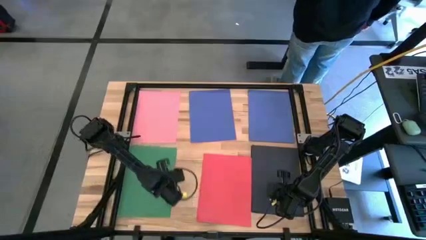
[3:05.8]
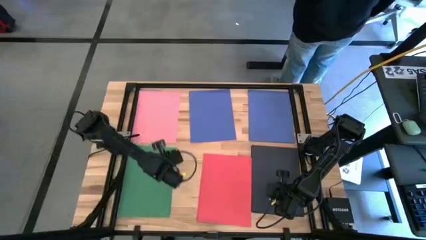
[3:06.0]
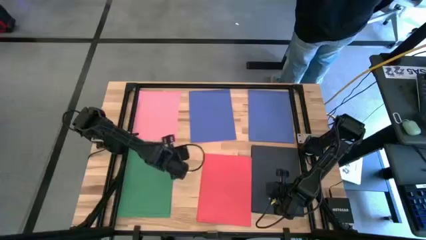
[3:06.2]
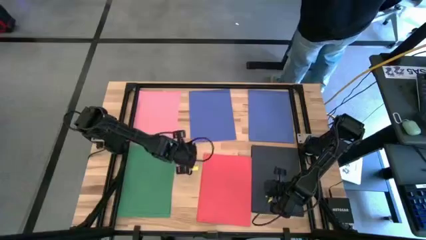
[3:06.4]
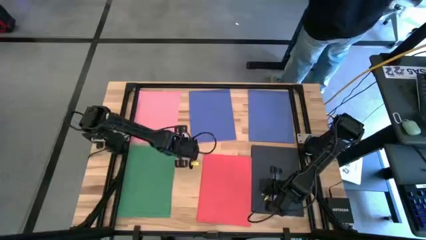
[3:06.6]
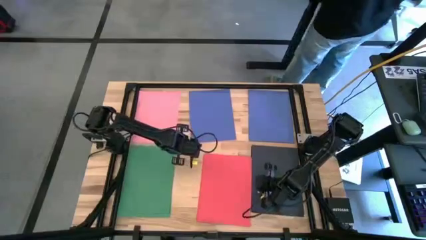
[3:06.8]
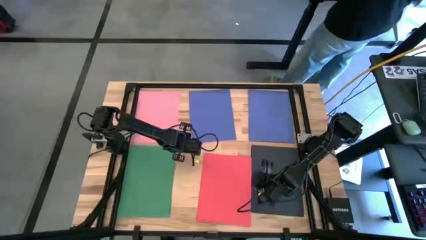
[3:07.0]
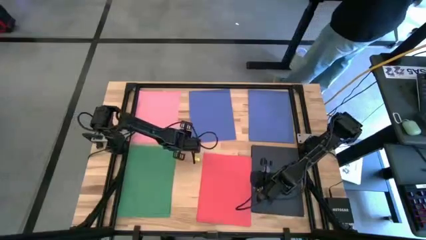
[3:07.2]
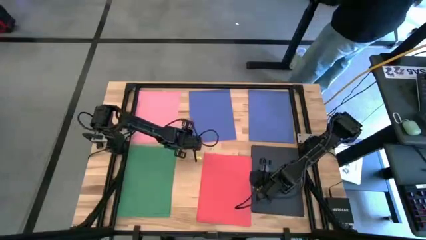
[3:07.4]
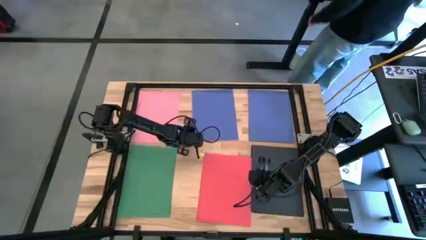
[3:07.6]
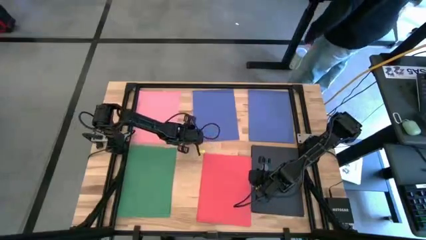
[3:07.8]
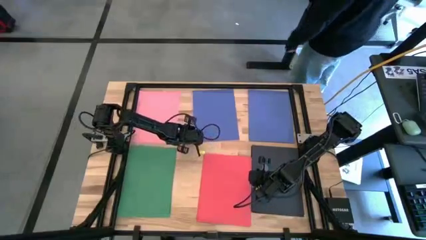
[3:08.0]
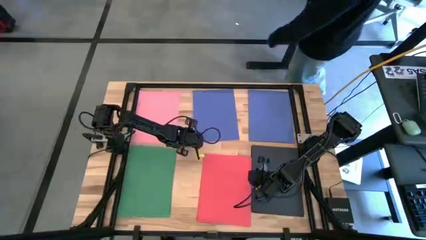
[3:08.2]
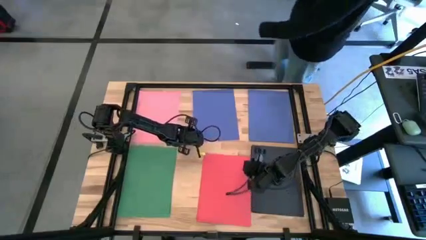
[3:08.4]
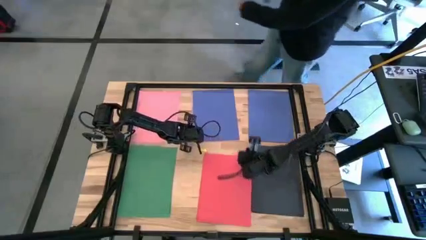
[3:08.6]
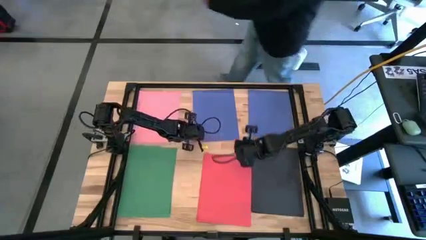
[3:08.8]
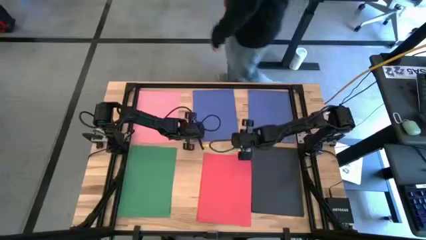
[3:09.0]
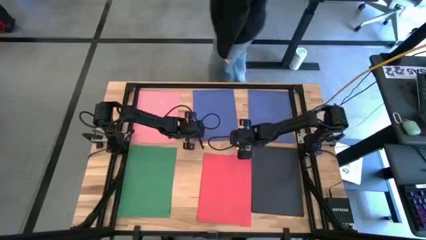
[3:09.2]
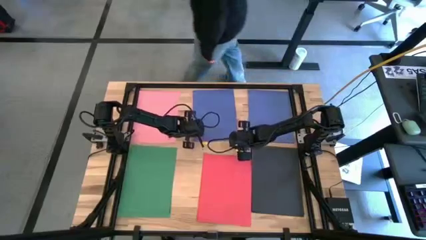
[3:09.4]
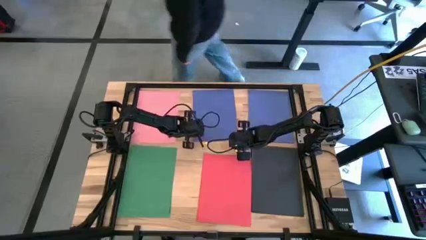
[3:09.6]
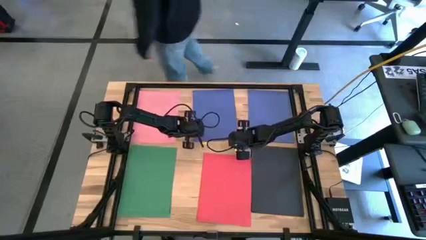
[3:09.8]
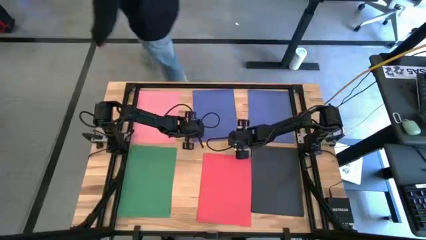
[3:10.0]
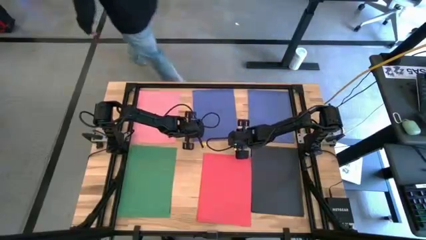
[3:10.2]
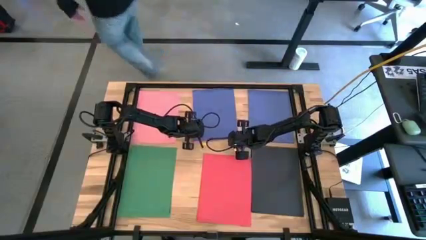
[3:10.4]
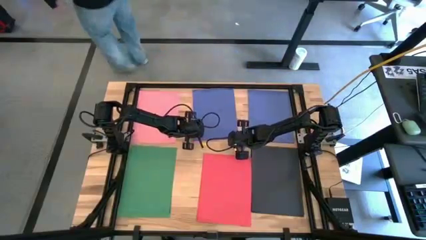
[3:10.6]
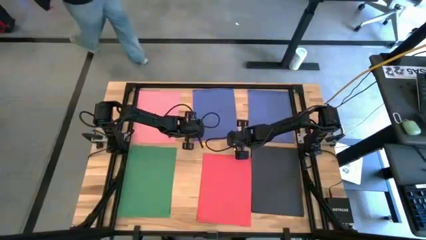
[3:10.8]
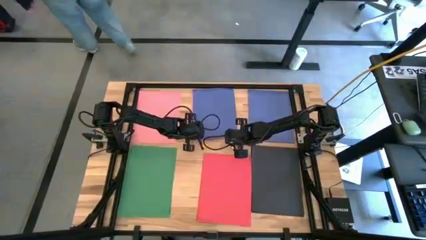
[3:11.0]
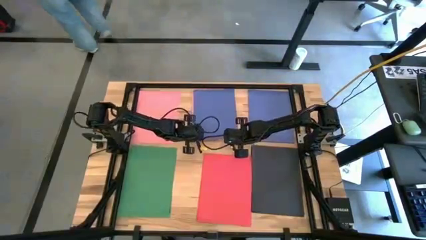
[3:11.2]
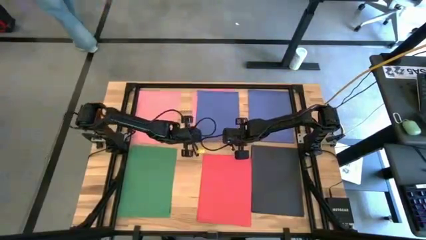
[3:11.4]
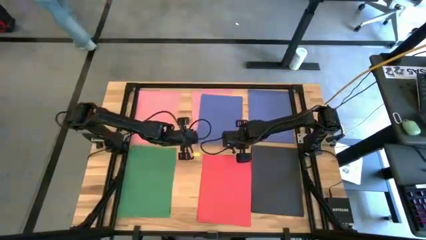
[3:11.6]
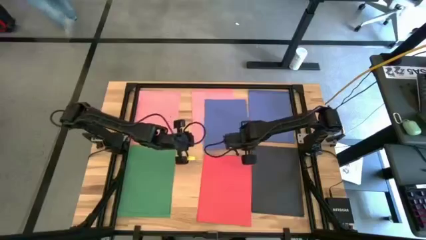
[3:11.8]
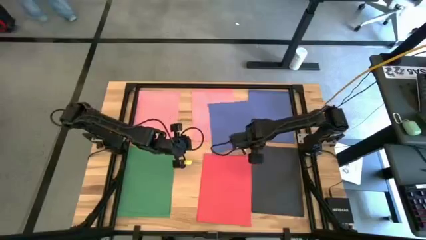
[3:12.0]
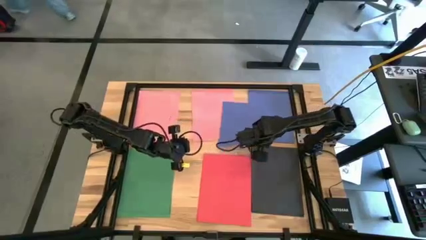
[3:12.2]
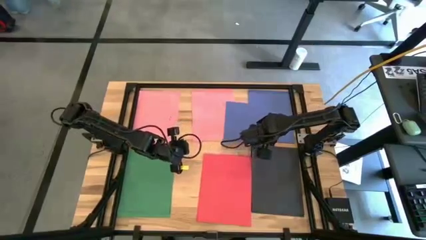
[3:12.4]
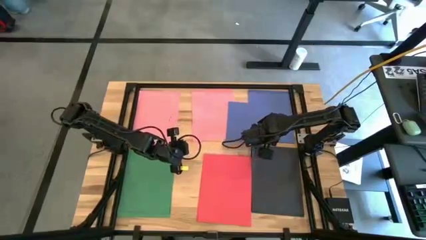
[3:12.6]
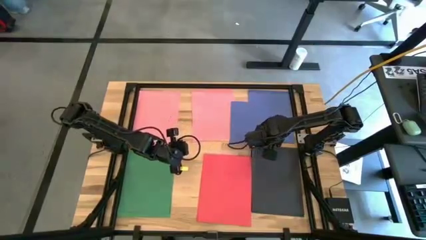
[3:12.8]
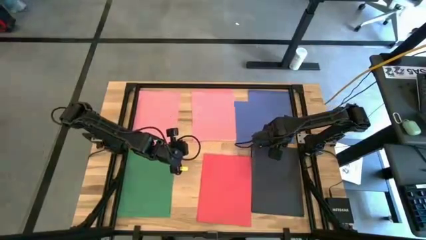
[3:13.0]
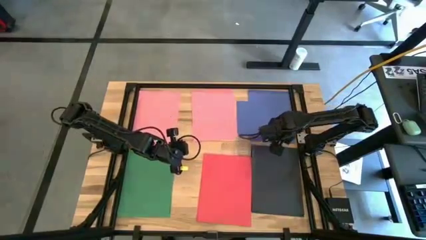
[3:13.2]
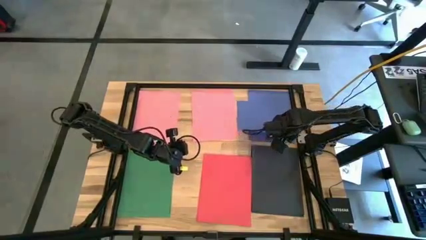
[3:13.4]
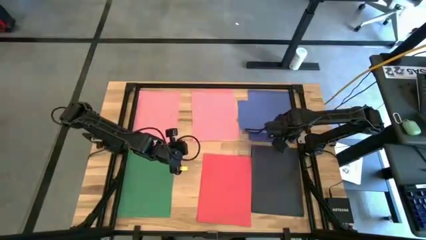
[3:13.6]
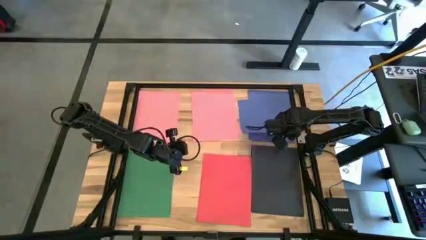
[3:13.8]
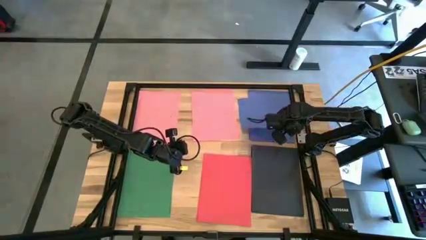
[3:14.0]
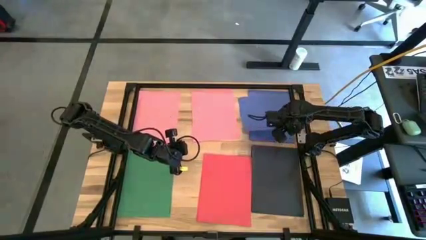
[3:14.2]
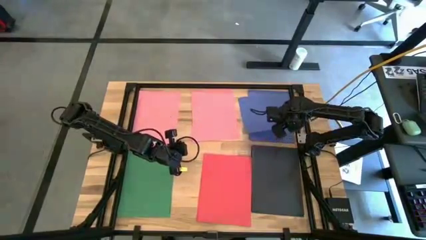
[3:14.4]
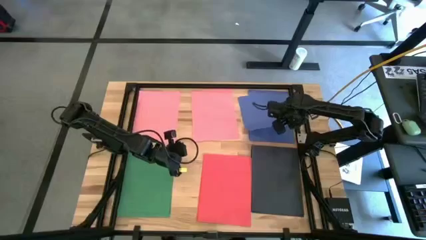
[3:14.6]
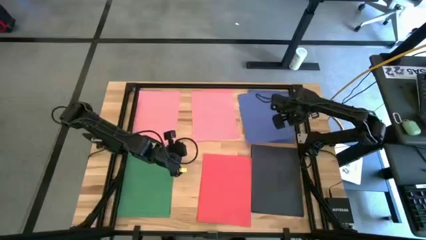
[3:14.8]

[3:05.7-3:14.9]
Task: Organize paper
Stack the blue paper on top of the blue paper

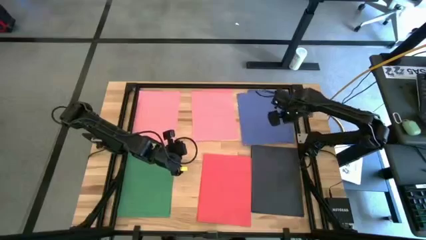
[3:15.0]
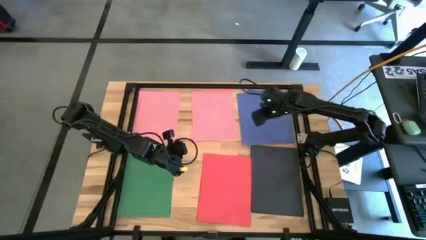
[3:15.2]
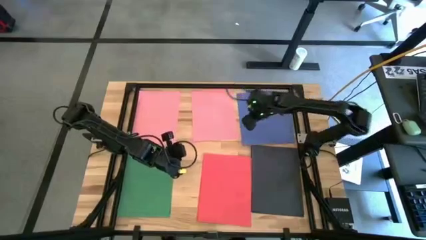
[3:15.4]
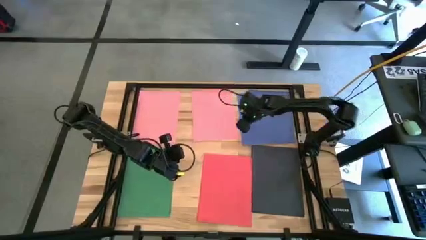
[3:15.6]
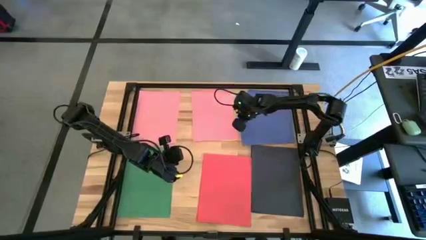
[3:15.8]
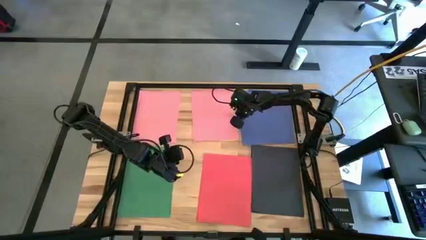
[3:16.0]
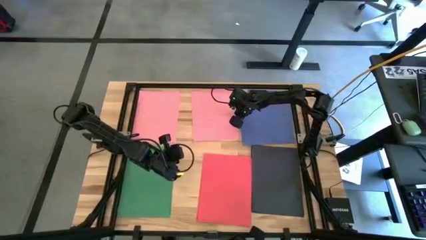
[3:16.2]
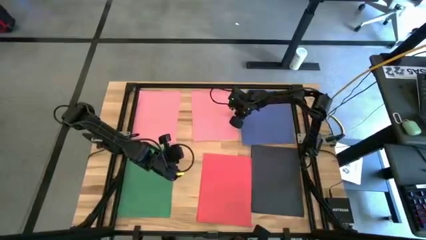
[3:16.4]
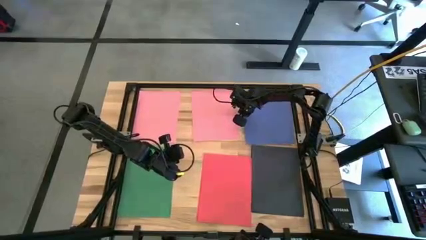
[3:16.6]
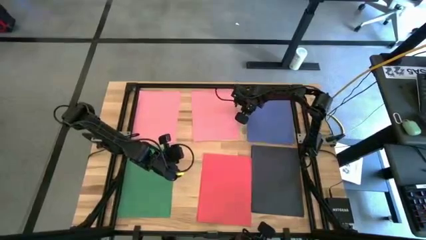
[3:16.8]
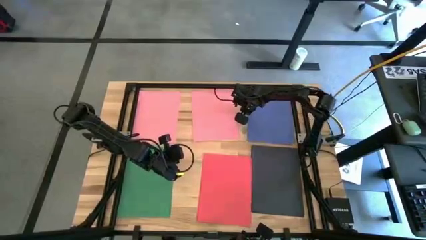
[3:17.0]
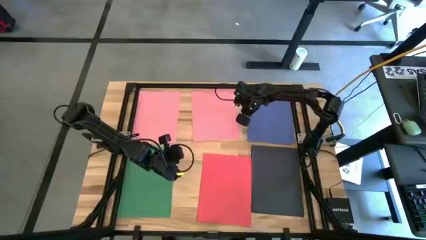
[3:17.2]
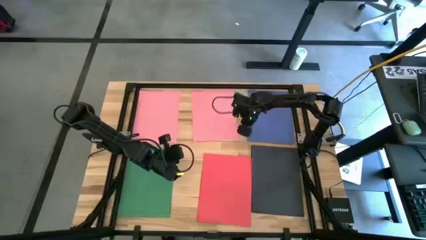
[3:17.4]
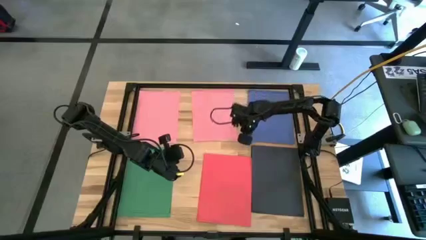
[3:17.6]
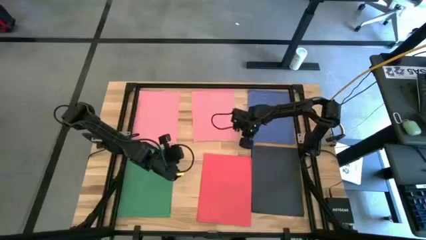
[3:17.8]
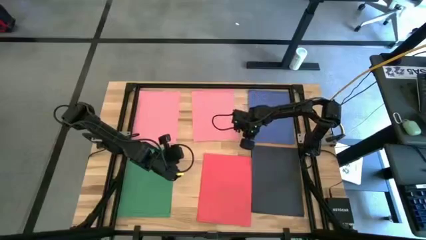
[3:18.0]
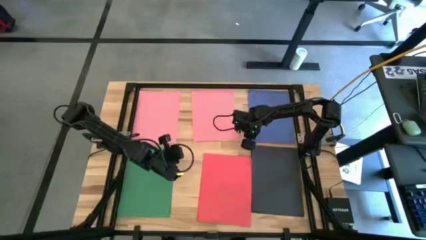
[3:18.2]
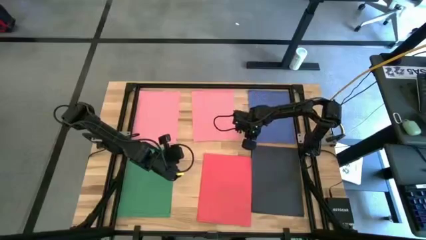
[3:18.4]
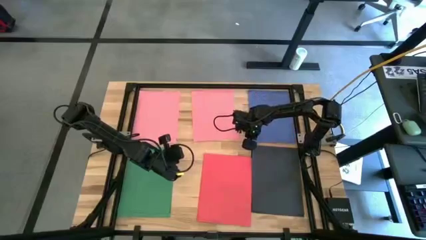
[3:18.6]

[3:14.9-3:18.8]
Adjust the stacked blue papers on the table

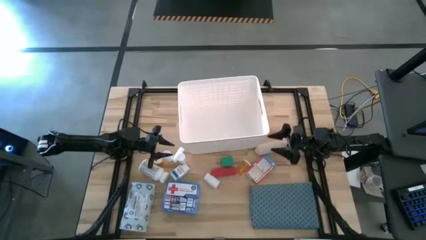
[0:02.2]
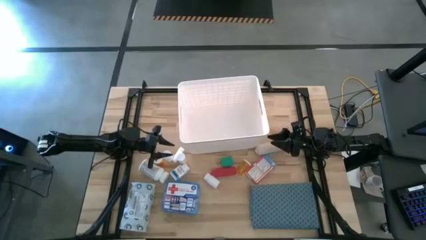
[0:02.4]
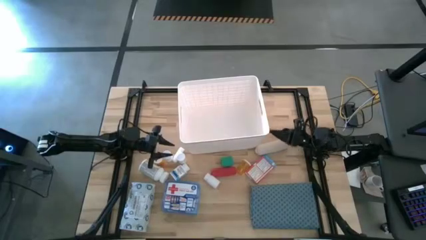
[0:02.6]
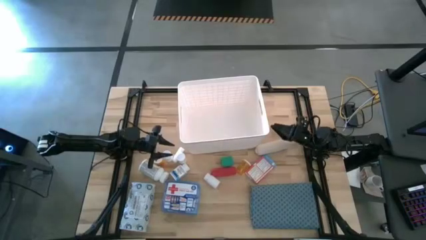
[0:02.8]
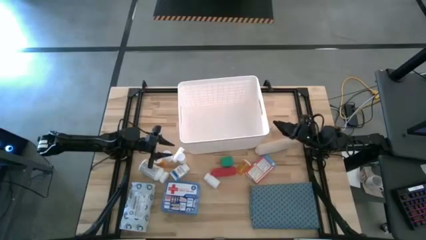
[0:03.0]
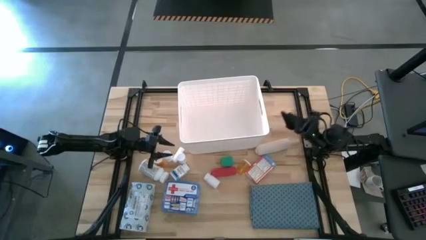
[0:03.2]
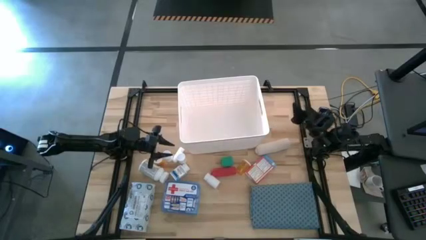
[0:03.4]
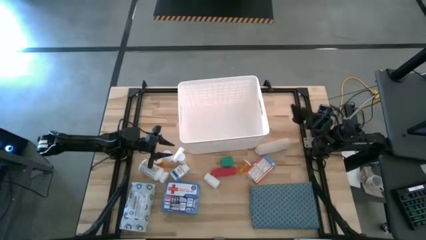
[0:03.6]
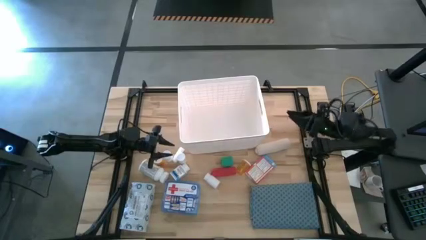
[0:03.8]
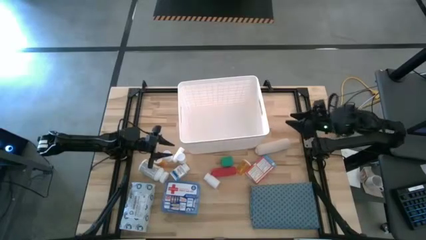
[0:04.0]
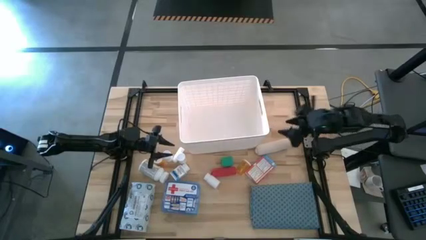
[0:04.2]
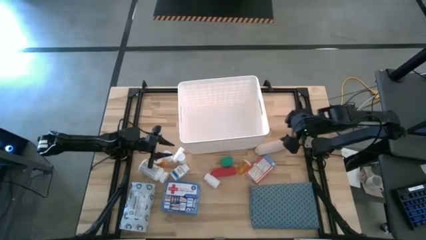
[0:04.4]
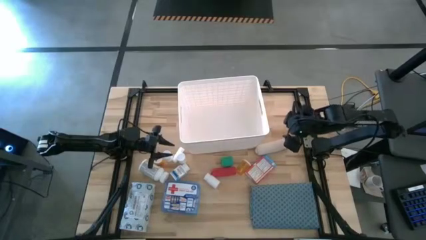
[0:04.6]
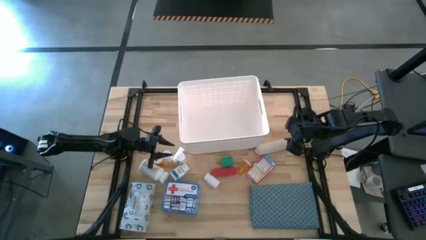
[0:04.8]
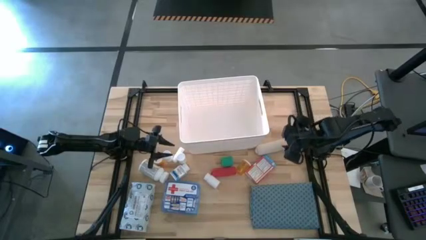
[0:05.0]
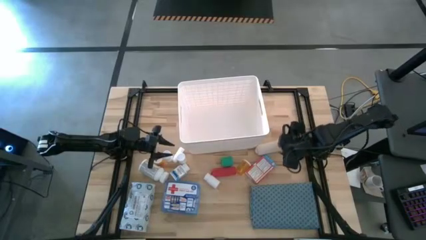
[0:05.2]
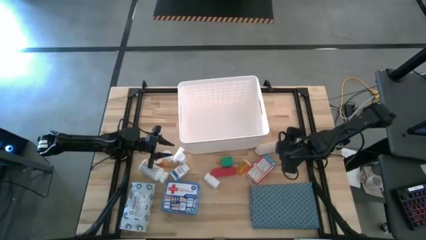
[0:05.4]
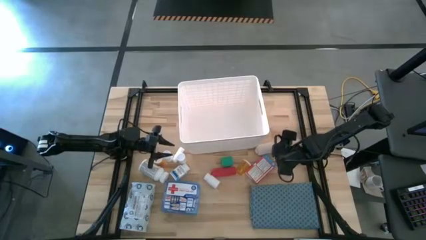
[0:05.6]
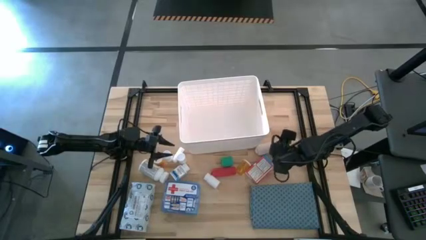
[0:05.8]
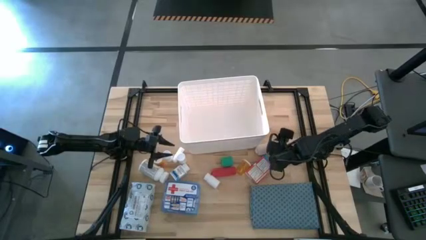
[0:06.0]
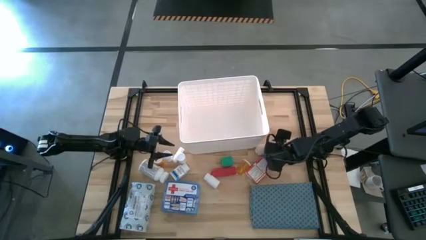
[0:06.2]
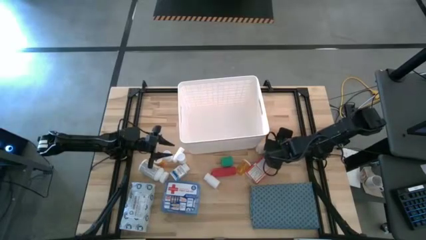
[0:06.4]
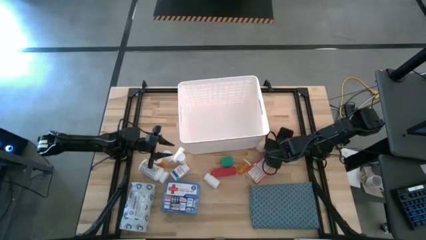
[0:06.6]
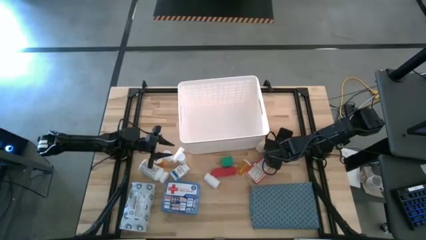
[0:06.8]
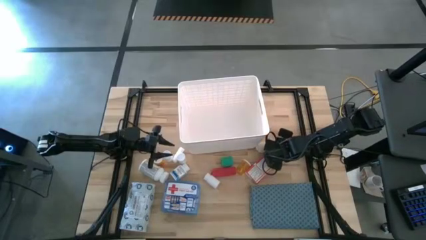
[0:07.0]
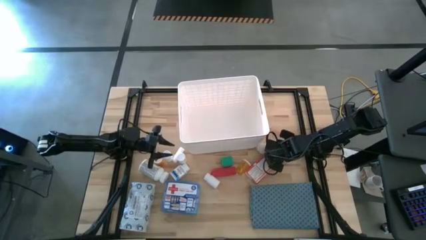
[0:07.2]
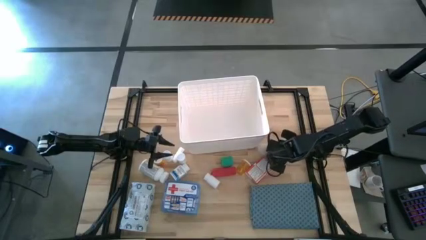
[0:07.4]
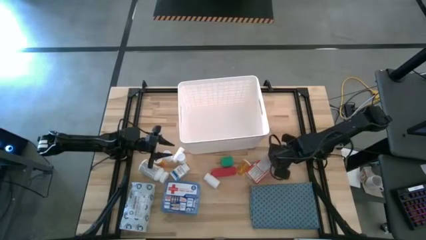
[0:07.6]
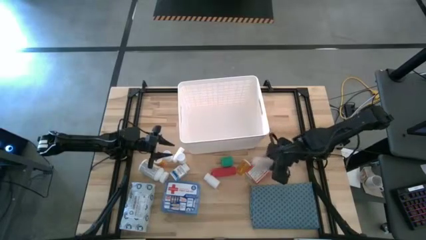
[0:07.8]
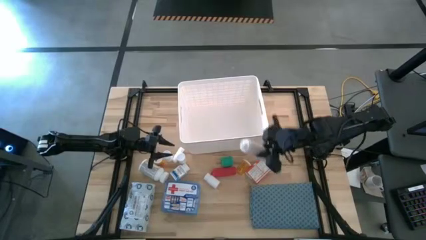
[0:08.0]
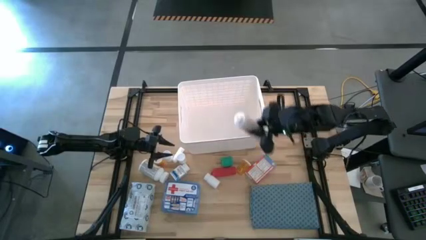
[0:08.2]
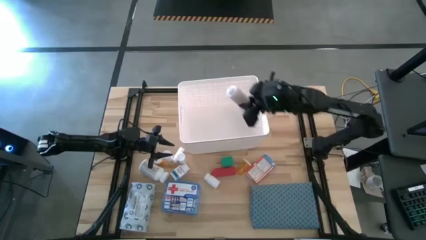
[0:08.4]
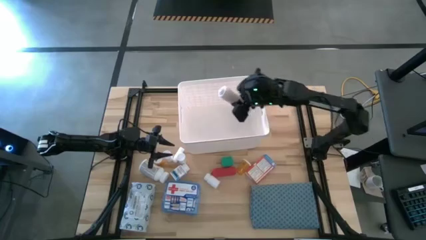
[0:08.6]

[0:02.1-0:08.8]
Task: Pick & place medical supplies in basket/bin
Put the white bandage into the white bin
